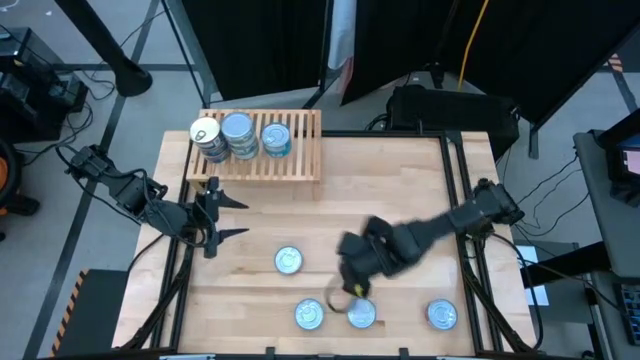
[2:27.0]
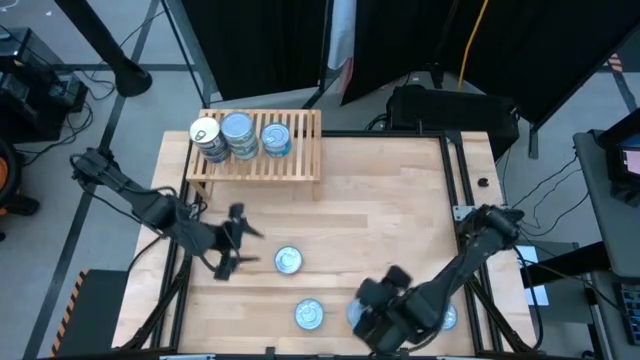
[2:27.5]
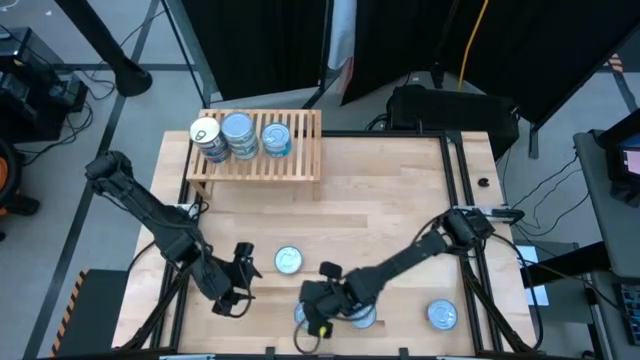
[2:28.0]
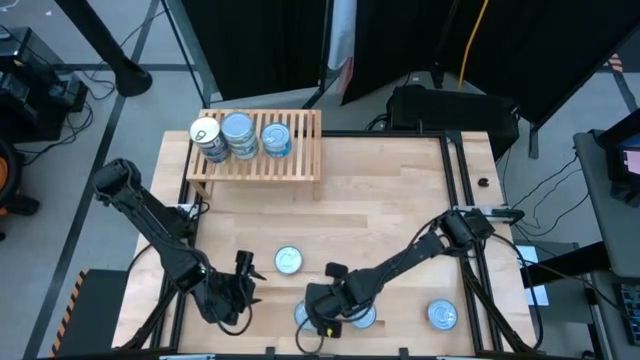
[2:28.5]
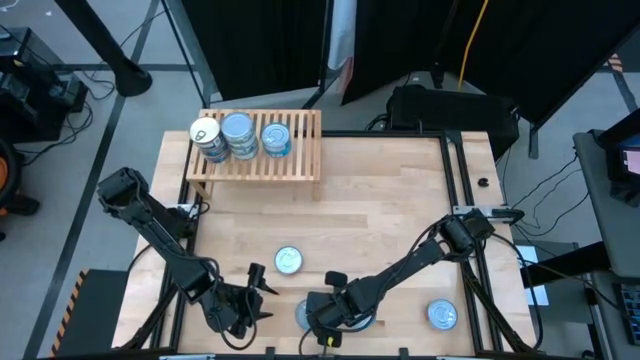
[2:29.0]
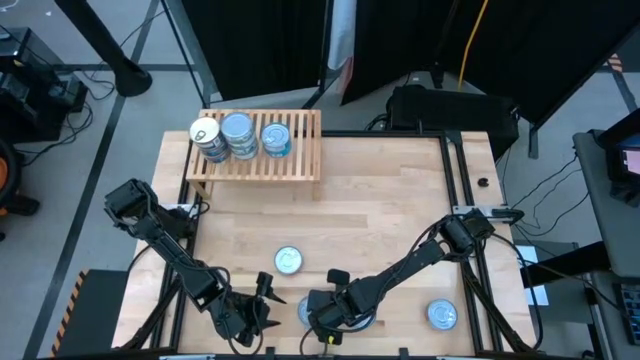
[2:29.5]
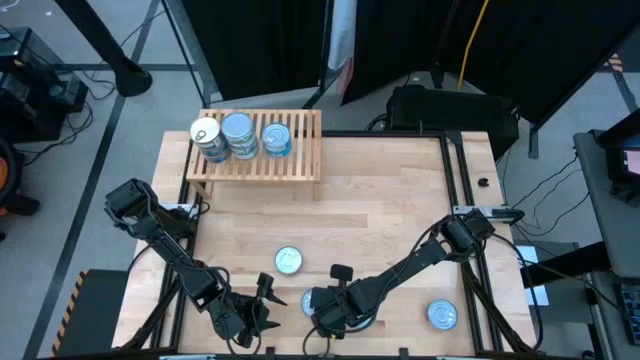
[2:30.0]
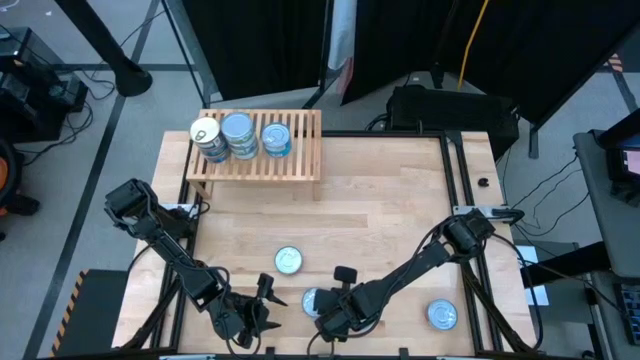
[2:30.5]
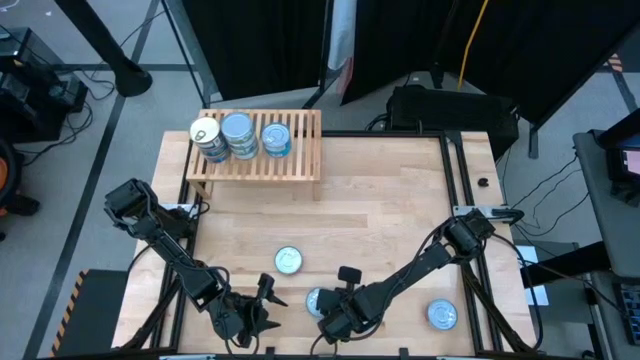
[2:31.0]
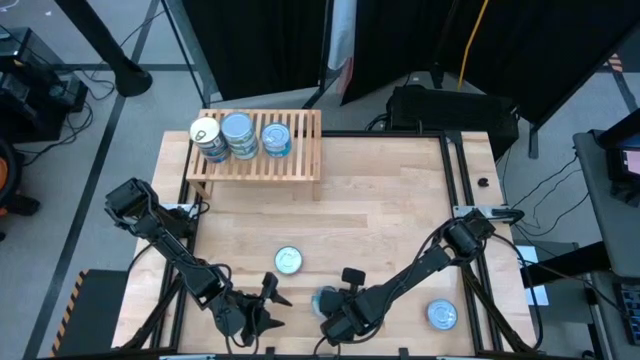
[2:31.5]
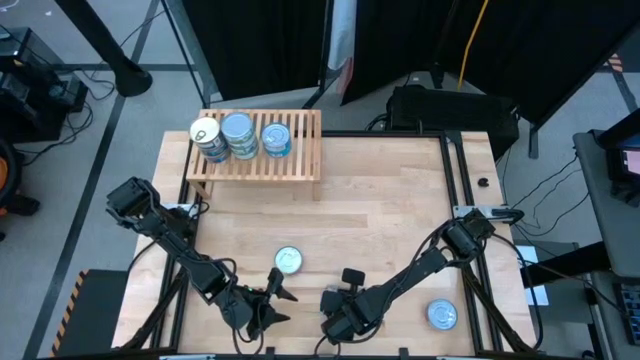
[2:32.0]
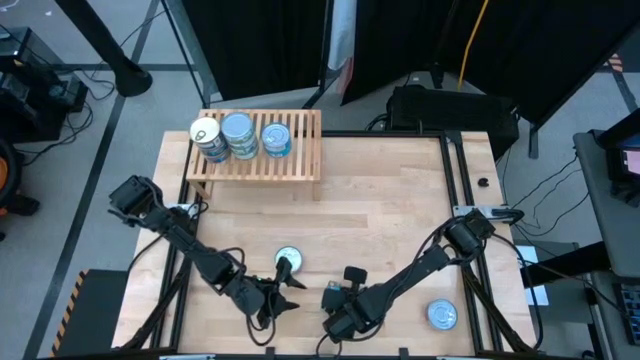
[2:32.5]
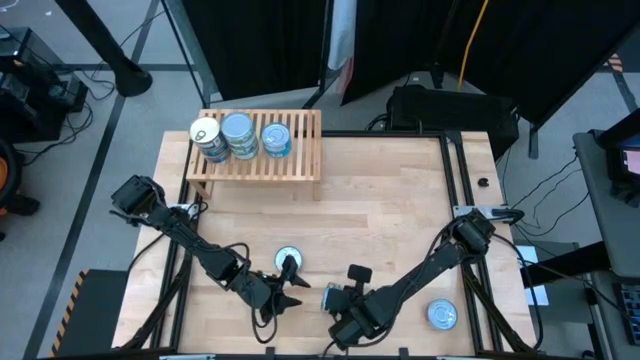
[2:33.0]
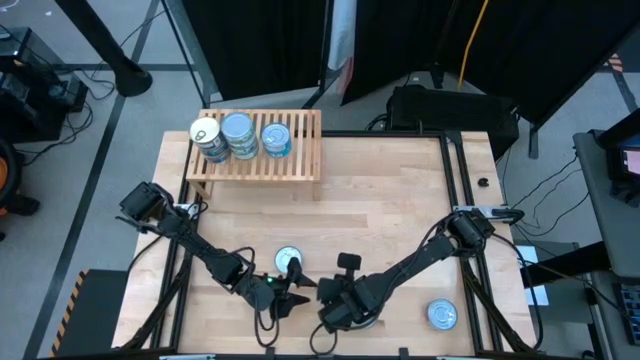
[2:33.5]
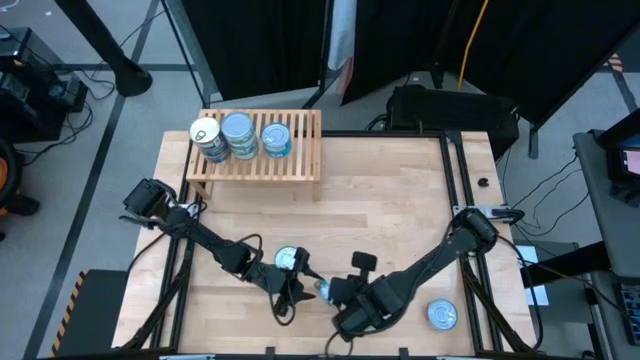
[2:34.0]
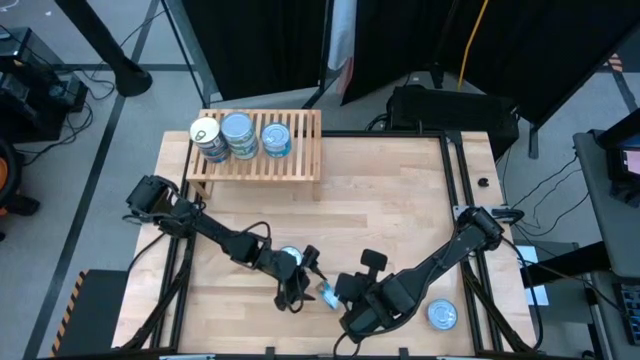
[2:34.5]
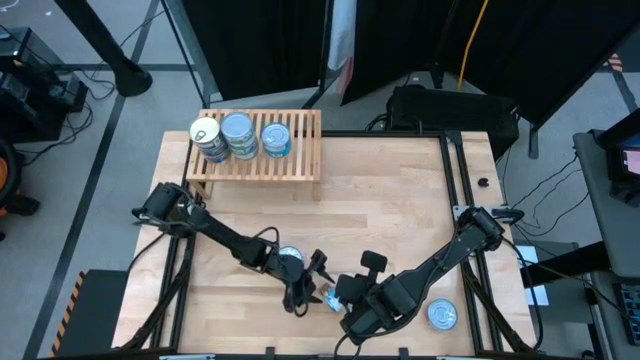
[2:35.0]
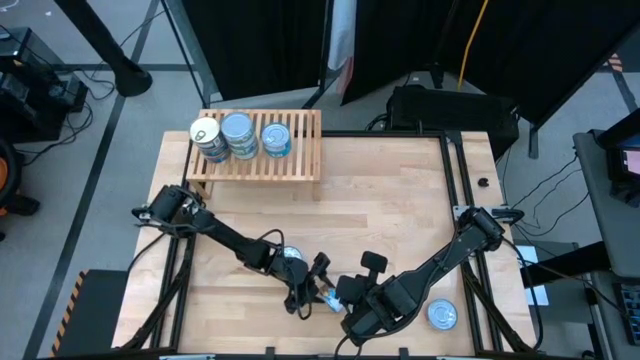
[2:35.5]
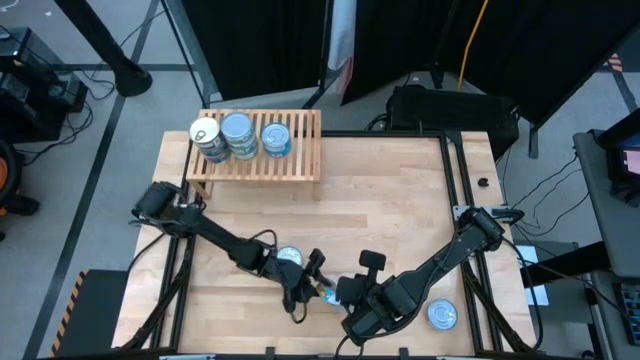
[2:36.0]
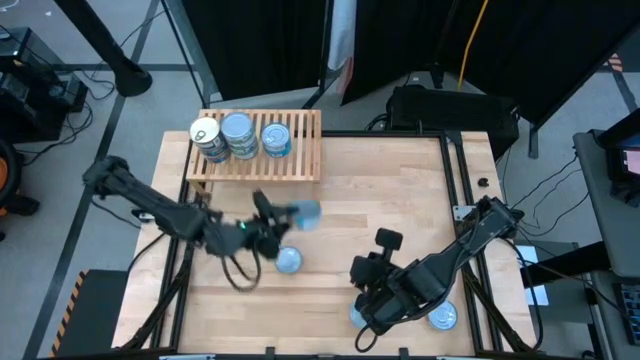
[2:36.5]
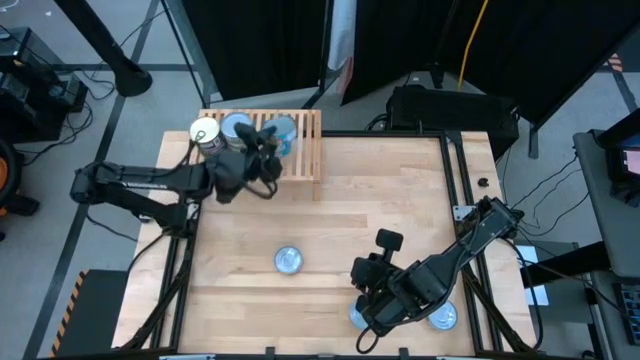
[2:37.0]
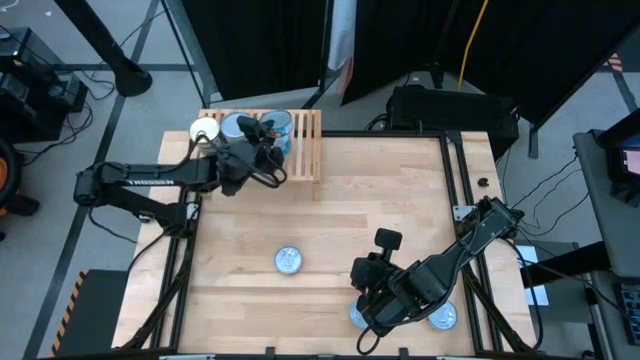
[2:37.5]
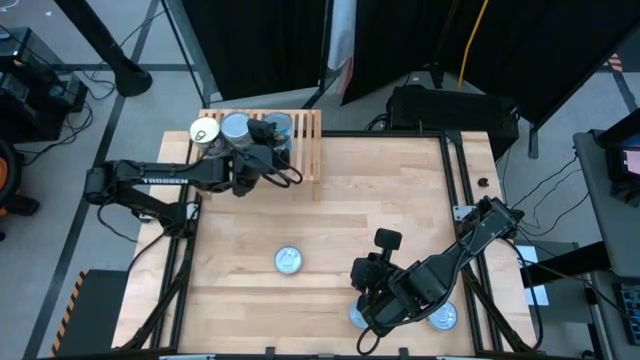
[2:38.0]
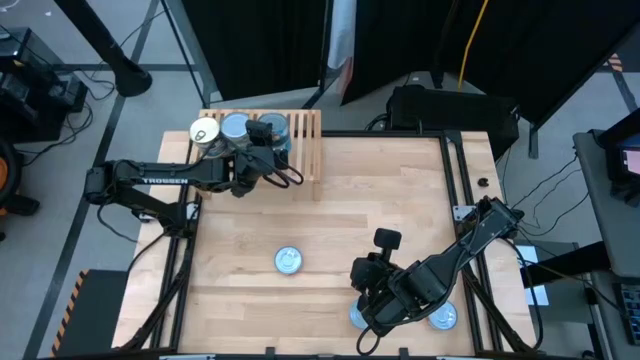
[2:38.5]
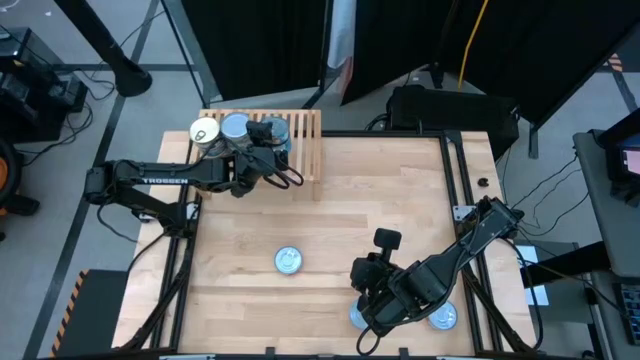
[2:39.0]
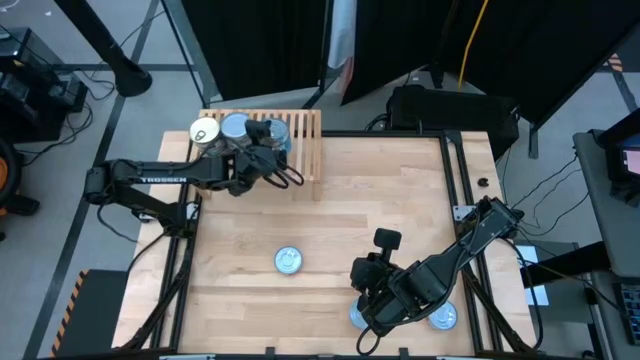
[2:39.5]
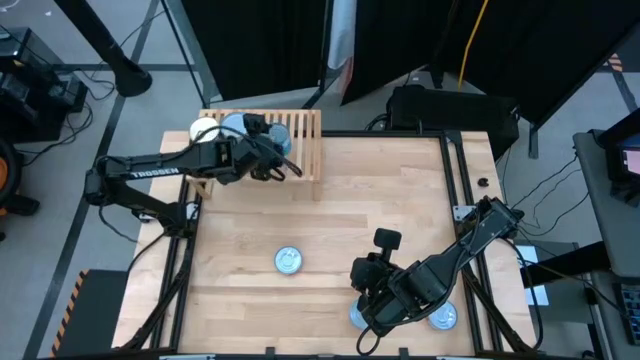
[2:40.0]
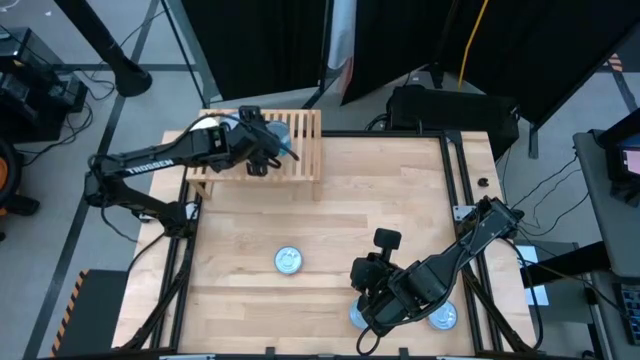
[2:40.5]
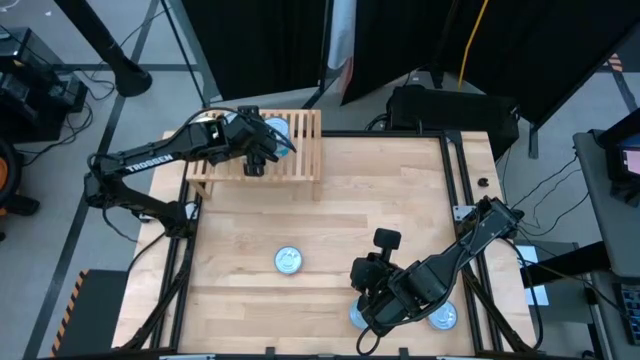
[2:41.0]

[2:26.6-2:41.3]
Task: Stack canned seafood by type on shelf
Stack the light blue can on top of the other light blue can

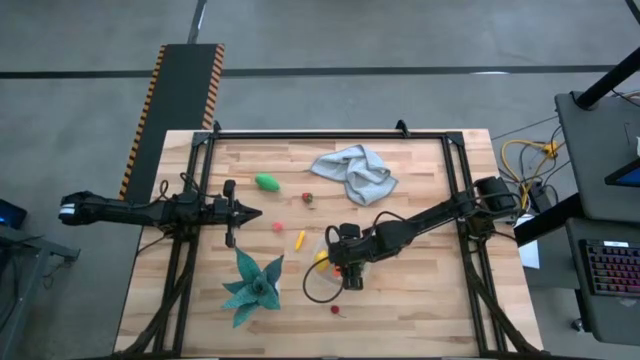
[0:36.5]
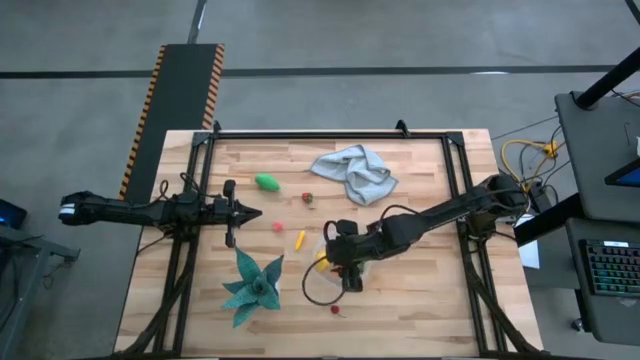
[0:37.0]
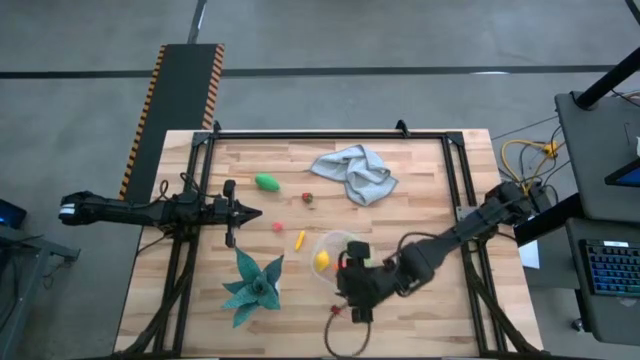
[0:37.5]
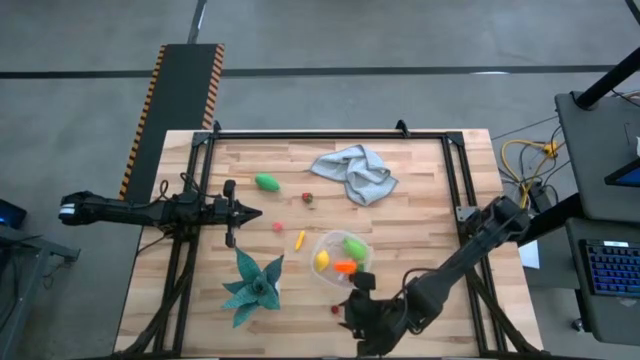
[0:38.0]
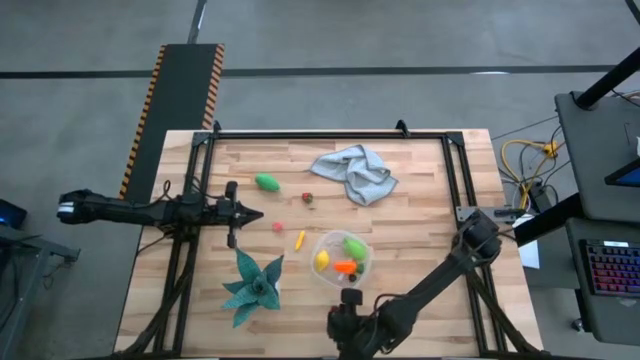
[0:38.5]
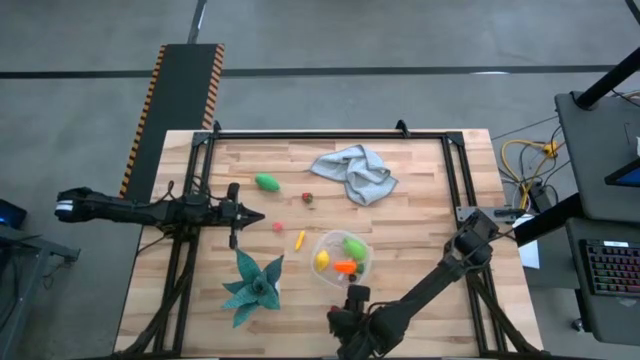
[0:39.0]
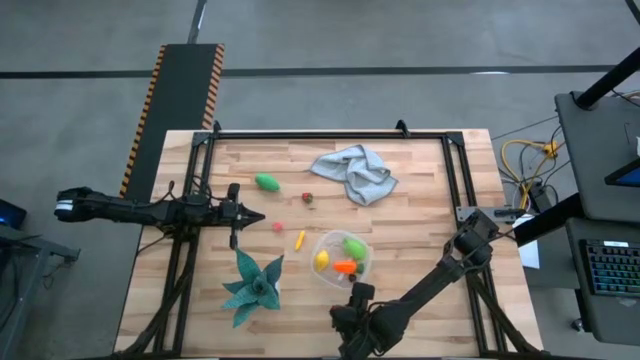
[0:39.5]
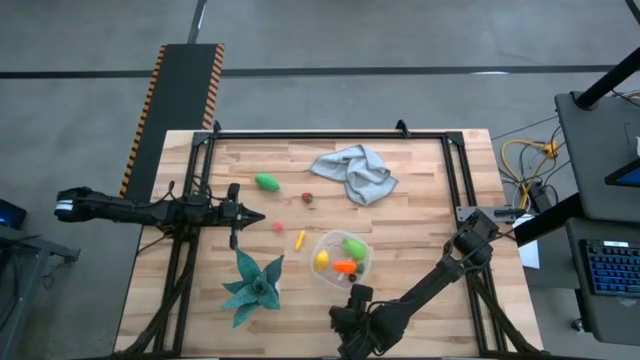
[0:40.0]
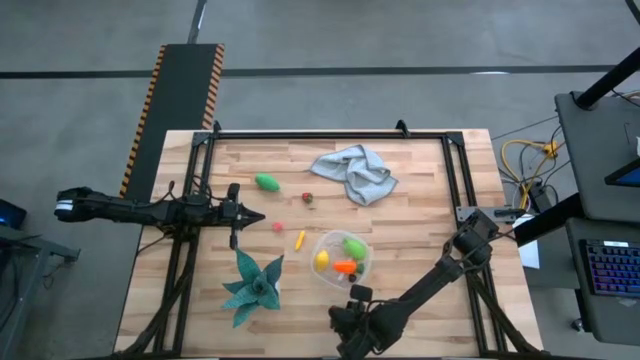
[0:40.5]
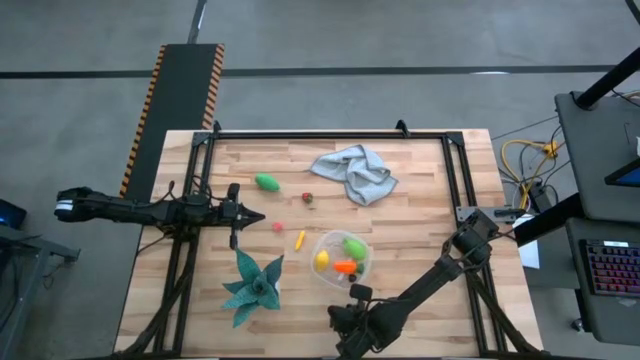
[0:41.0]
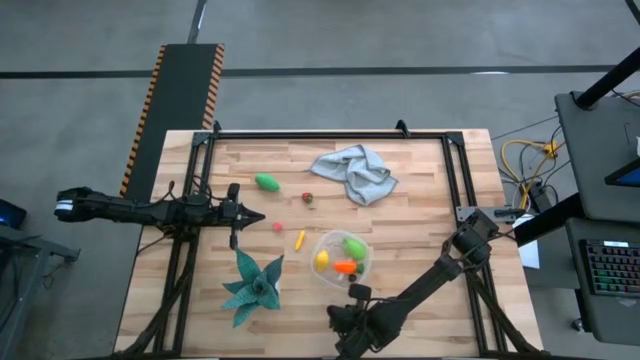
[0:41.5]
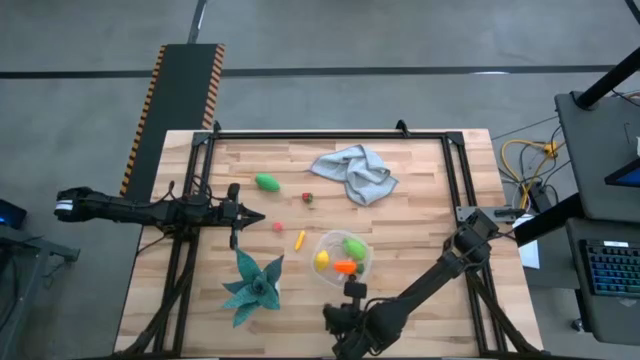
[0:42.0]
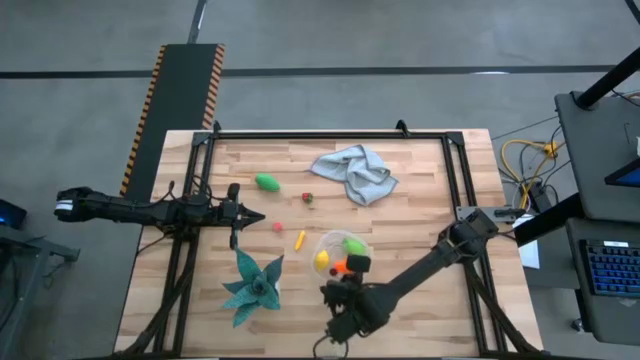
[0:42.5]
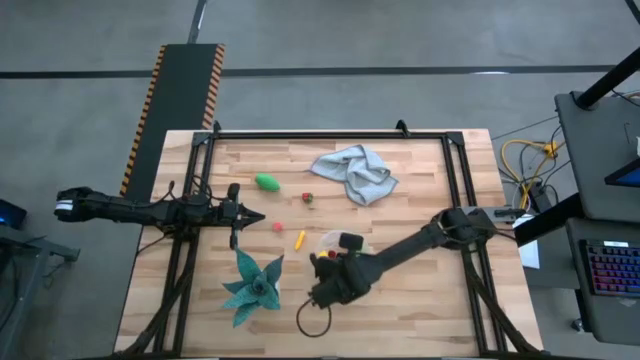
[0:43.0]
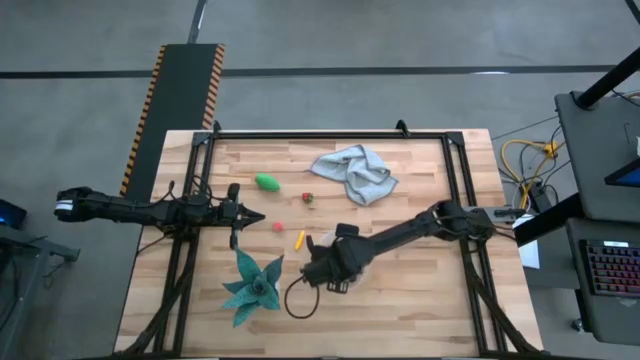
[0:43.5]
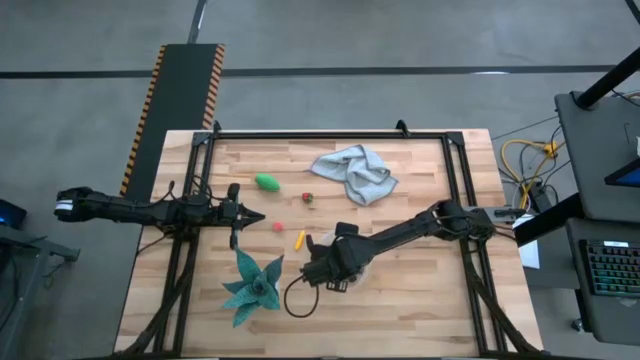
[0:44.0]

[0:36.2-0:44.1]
Task: Pick and placing Produce into tupperware
Put the red cherry into the container
